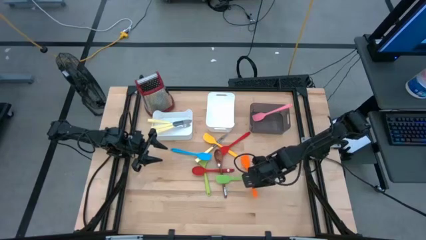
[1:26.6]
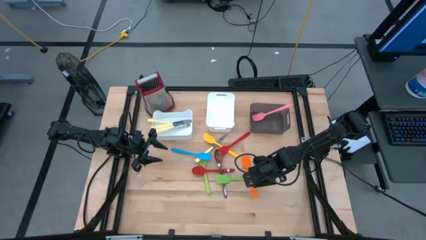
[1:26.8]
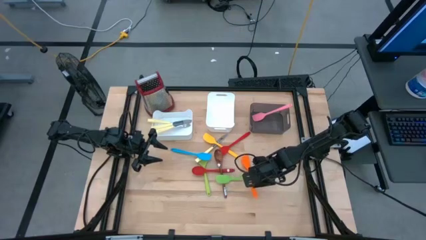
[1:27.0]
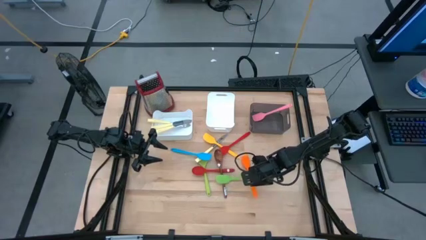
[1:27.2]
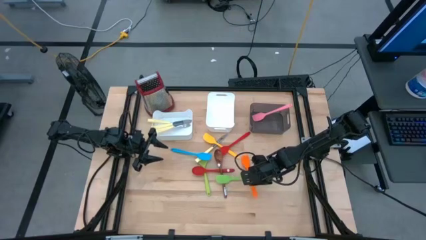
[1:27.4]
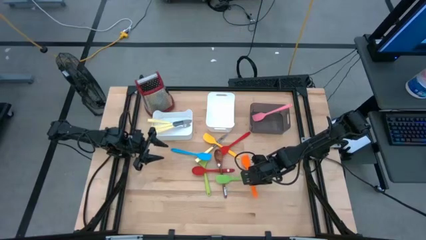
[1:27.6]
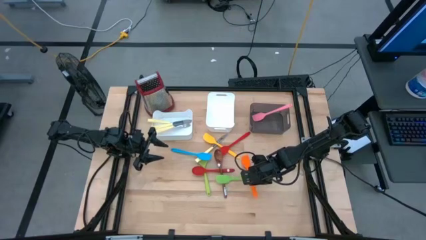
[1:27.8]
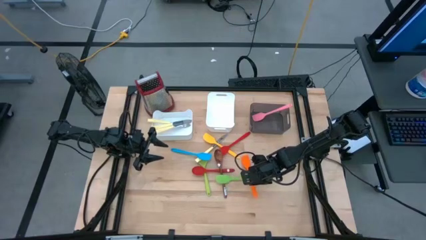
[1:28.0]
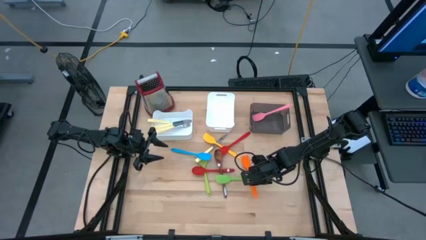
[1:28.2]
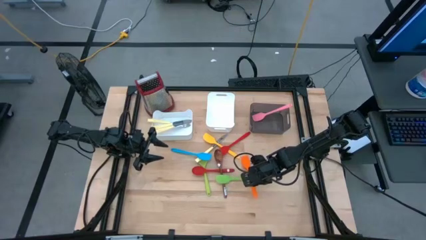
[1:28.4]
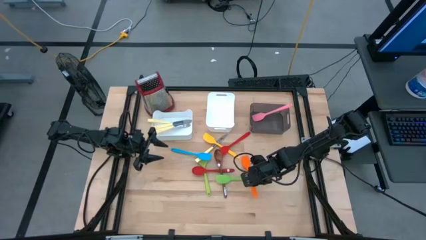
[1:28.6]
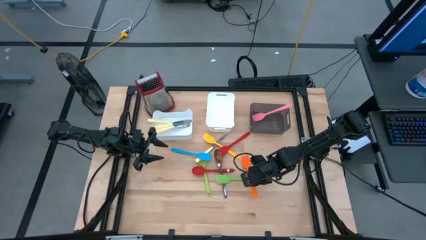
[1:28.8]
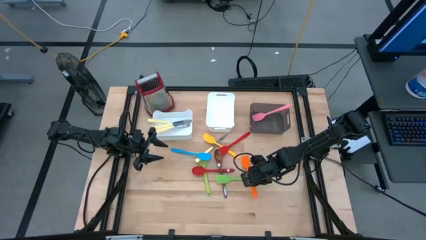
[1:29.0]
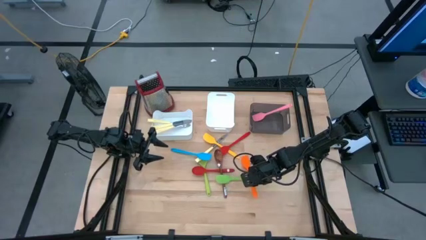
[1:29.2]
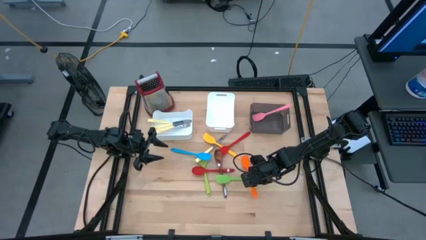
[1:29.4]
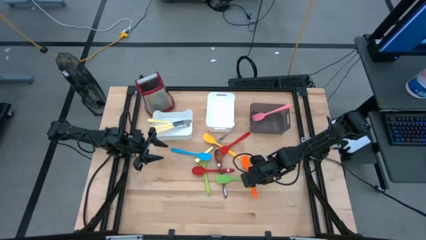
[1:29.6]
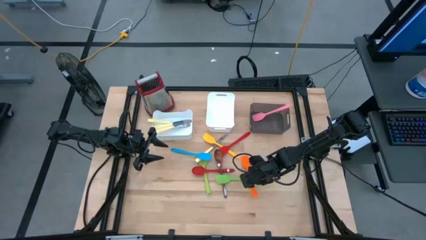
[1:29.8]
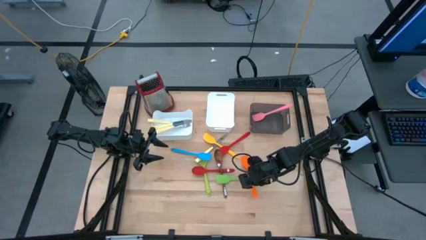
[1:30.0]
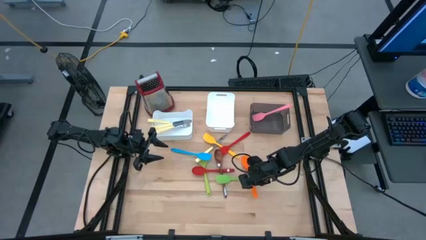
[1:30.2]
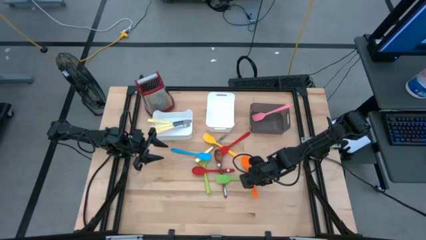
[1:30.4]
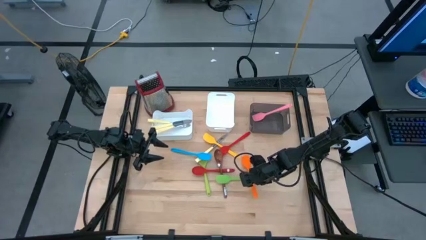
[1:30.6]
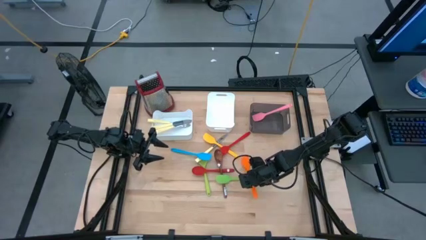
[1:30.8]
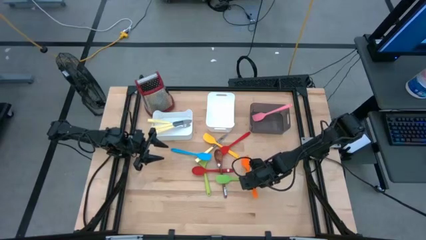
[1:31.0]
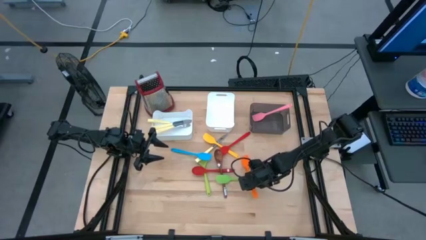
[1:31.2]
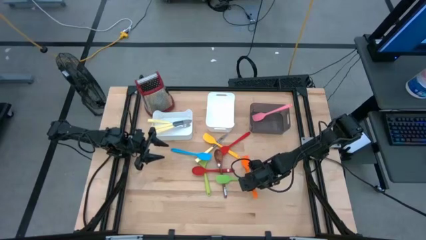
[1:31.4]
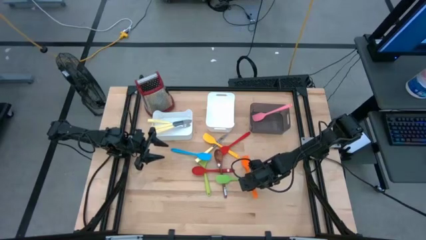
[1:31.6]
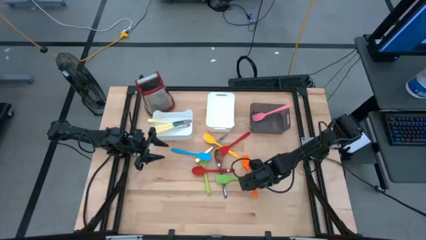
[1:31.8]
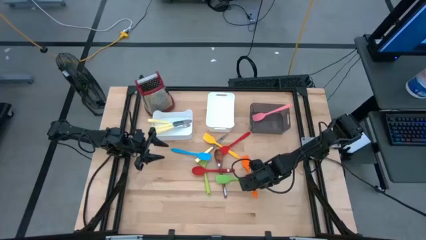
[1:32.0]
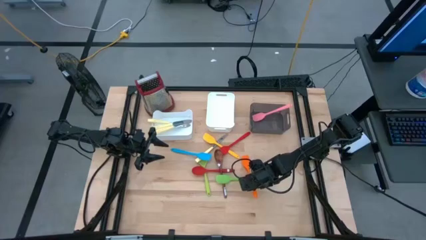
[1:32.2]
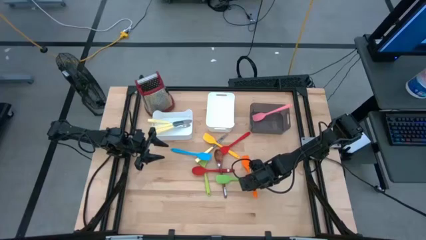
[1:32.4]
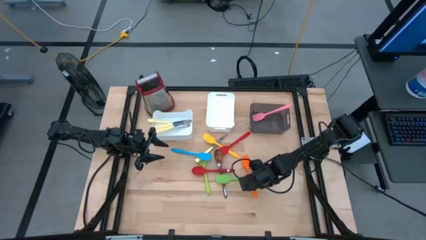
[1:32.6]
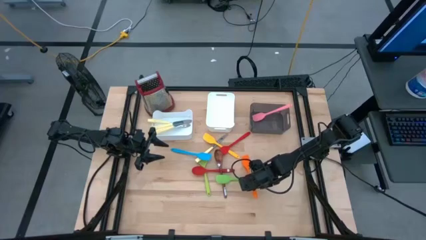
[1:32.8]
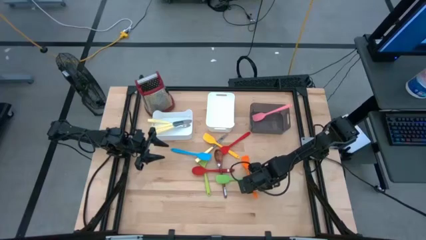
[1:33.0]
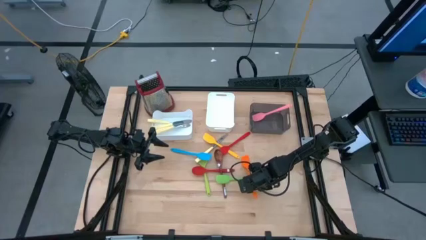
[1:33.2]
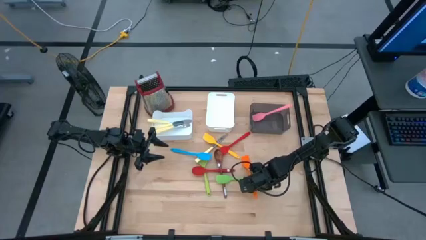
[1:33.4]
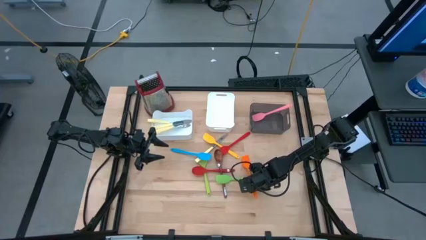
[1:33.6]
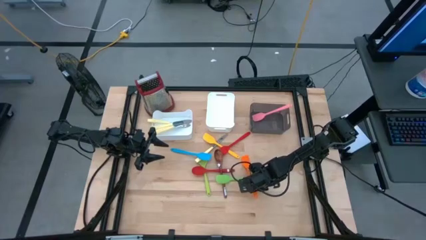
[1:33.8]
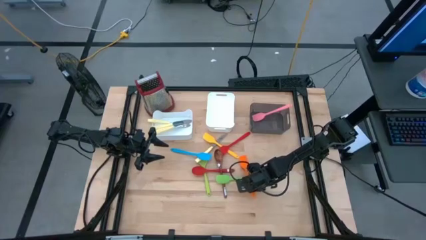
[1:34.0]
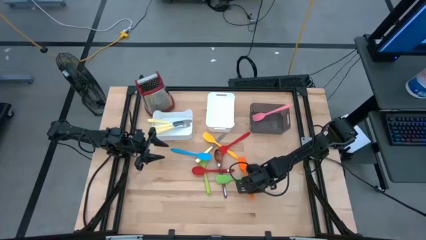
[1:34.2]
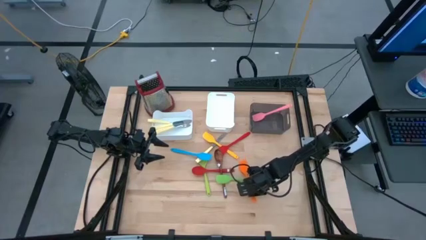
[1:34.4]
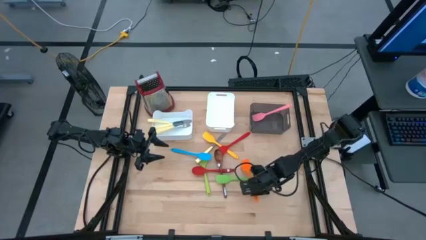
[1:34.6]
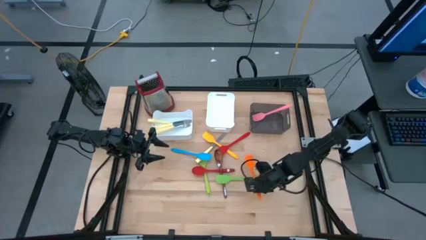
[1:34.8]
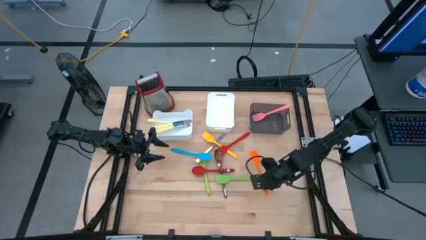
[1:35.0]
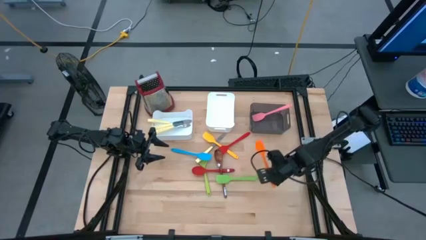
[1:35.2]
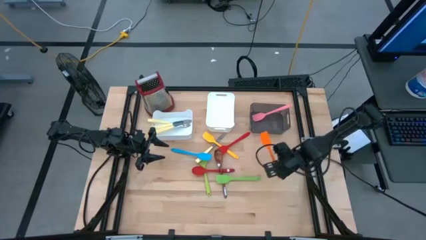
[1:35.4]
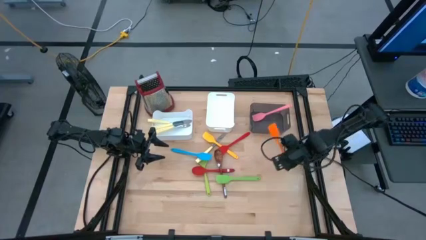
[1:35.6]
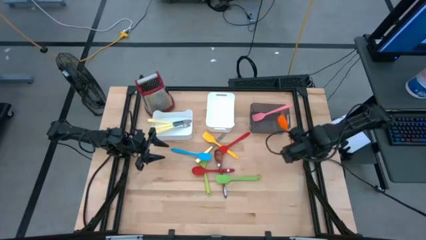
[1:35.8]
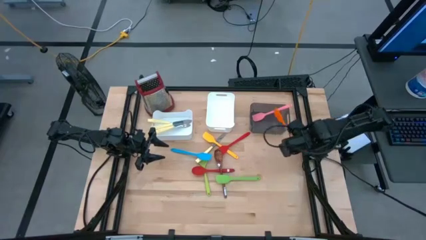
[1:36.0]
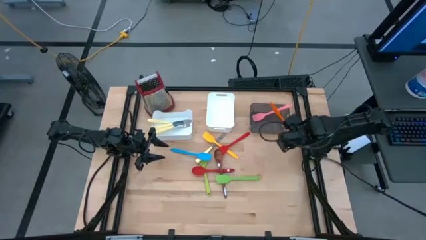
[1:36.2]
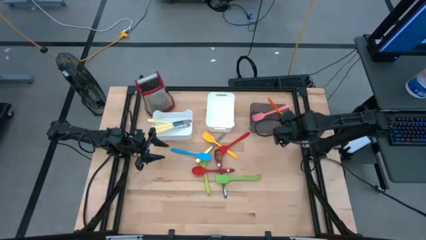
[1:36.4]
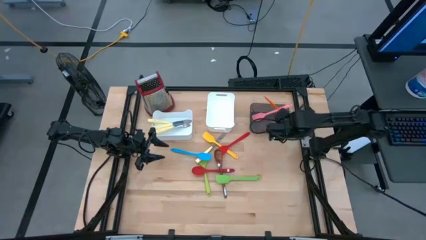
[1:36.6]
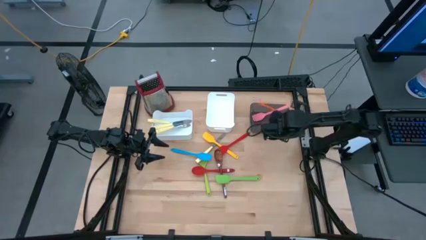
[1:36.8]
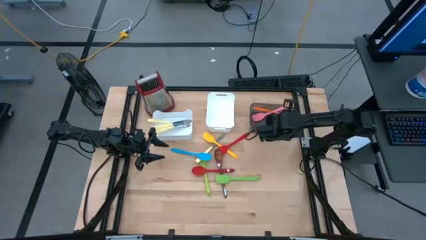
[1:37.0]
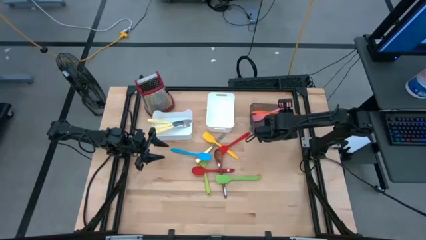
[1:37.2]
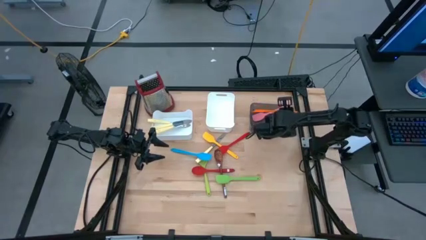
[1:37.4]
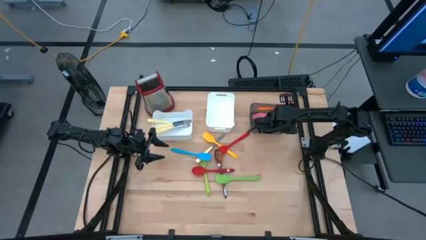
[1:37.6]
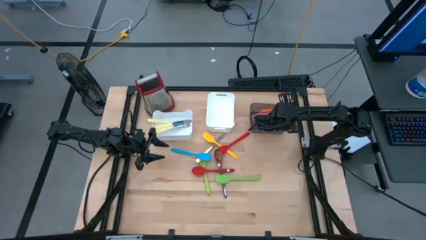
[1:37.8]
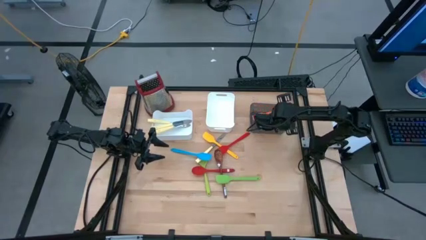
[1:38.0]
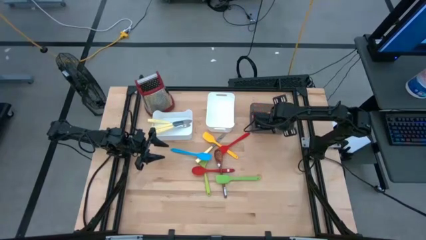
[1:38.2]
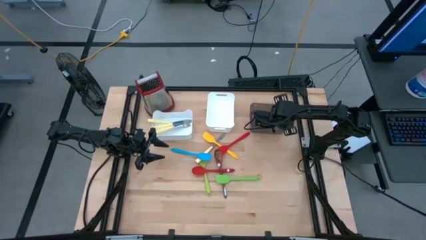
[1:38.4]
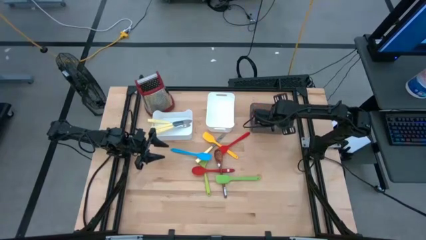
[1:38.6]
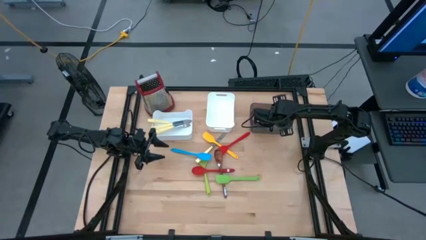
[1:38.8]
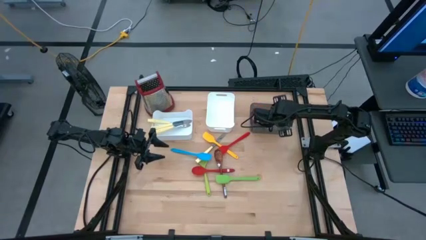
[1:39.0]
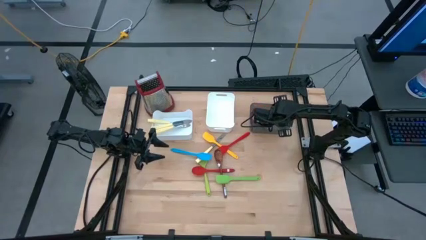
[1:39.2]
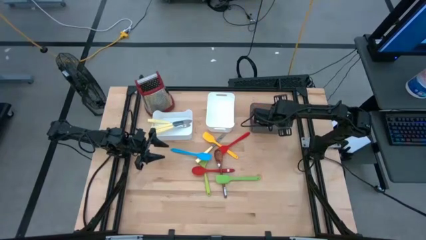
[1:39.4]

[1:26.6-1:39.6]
Task: Pick & Place Kitchen Items
Put the orange spatula into the black bin
